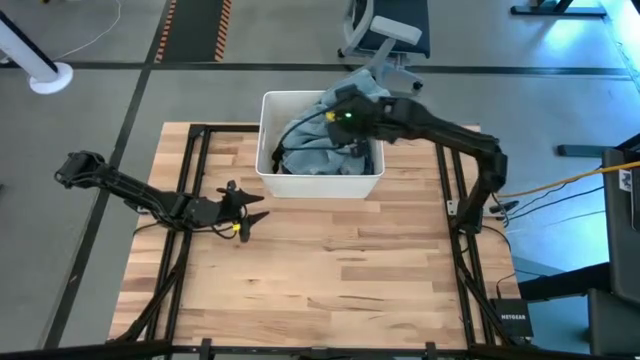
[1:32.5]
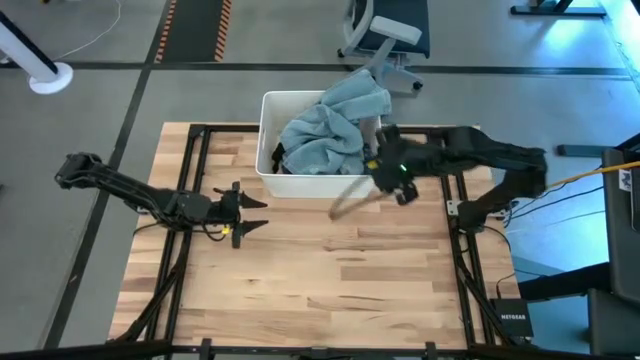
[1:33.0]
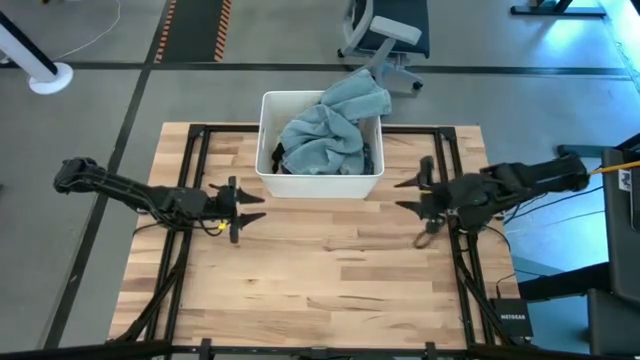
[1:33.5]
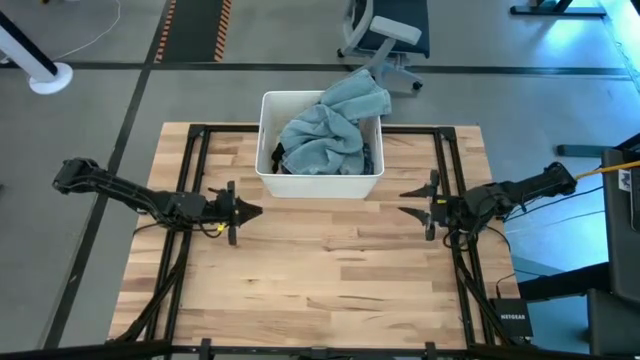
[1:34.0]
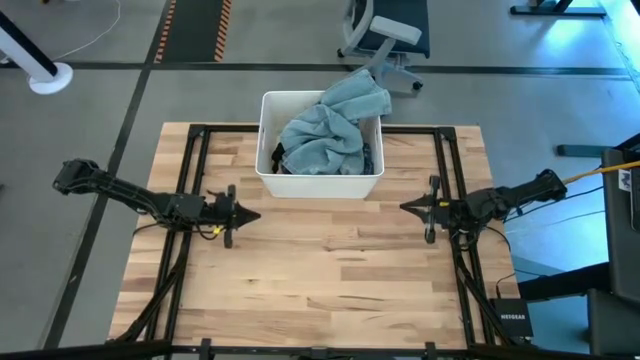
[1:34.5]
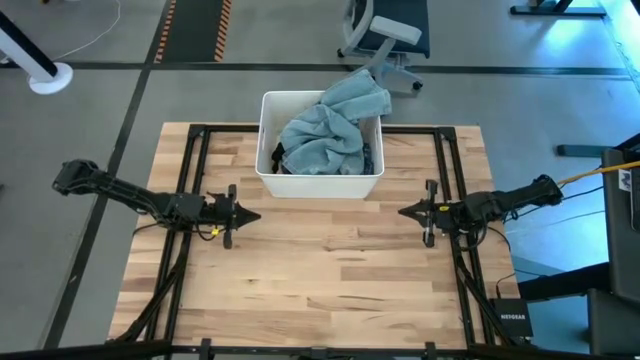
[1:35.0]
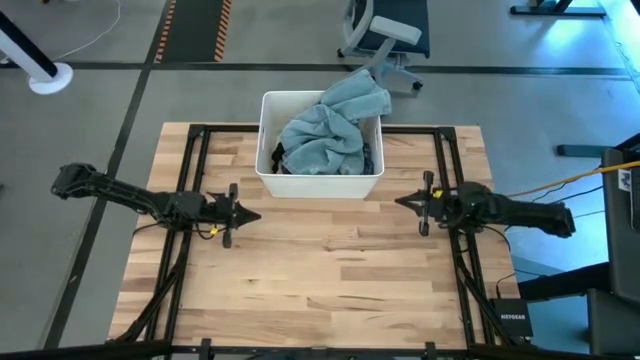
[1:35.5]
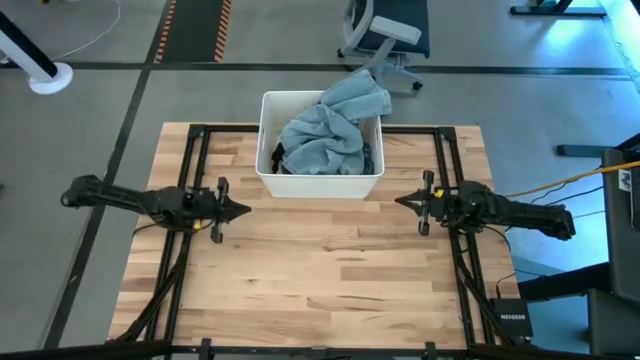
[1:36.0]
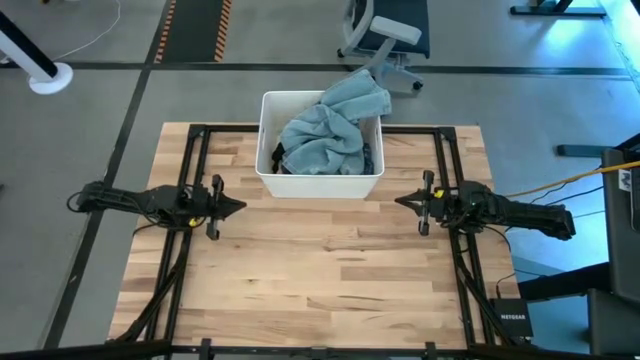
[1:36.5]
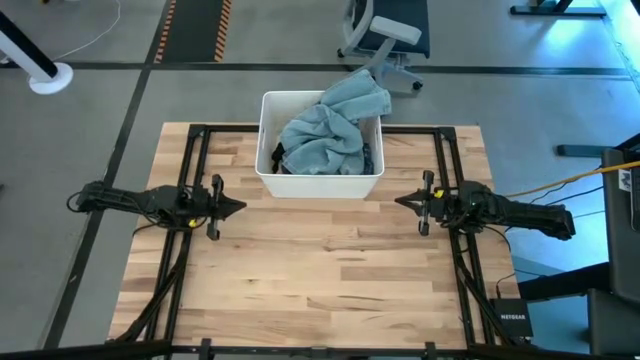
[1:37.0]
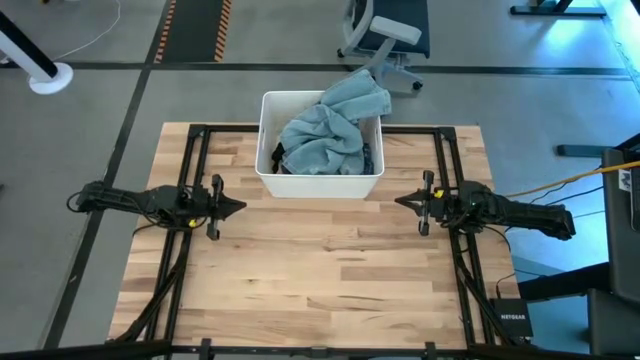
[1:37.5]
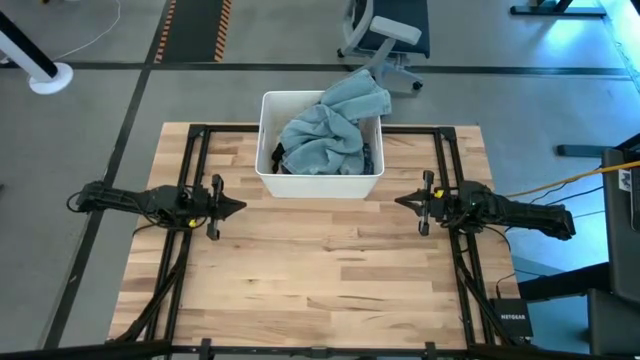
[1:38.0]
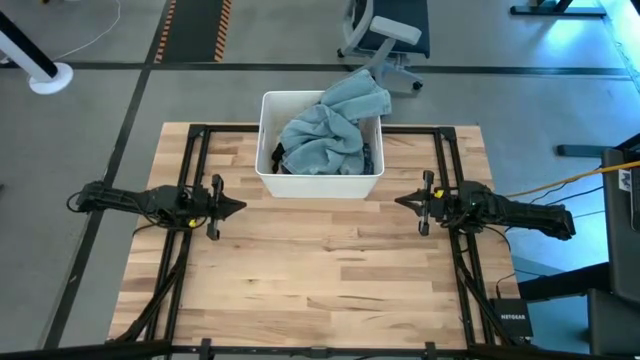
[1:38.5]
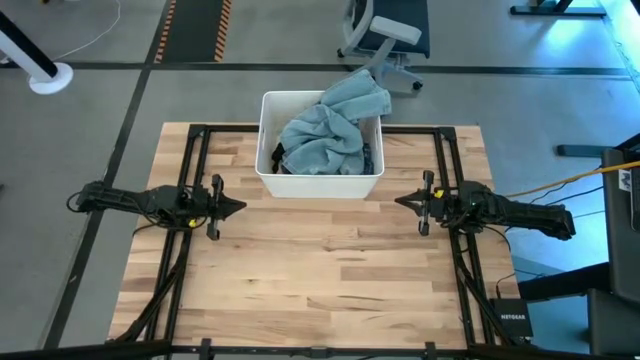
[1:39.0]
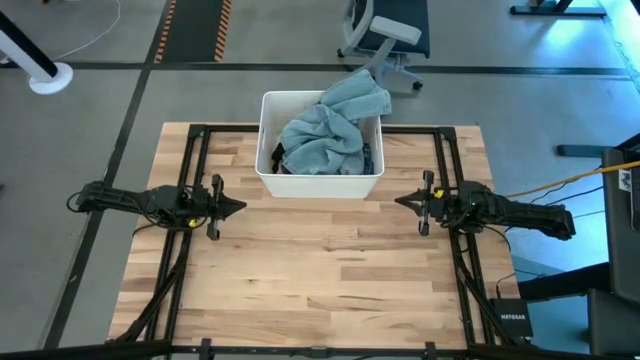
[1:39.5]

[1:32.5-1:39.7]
Task: Sort clothes
Return to Home Position

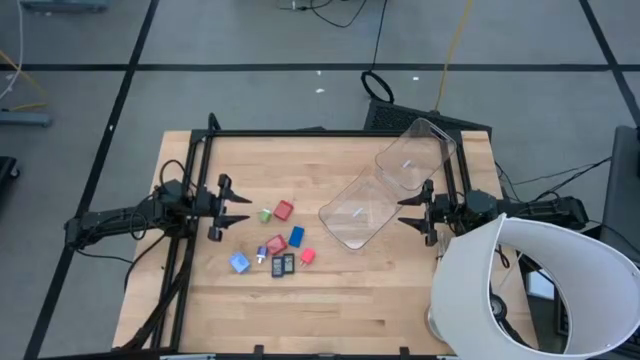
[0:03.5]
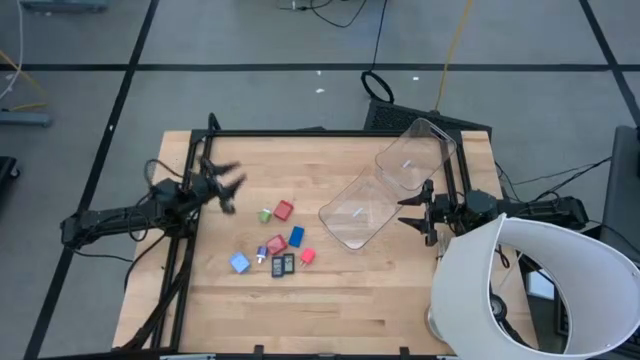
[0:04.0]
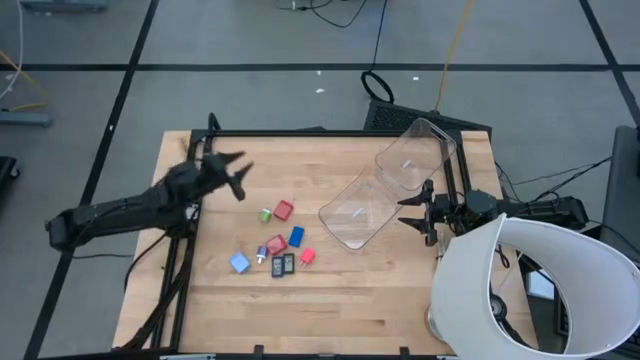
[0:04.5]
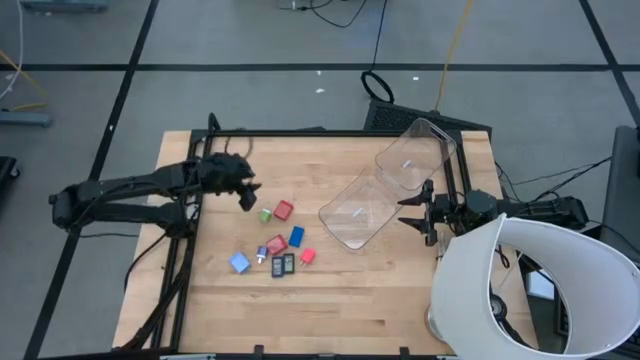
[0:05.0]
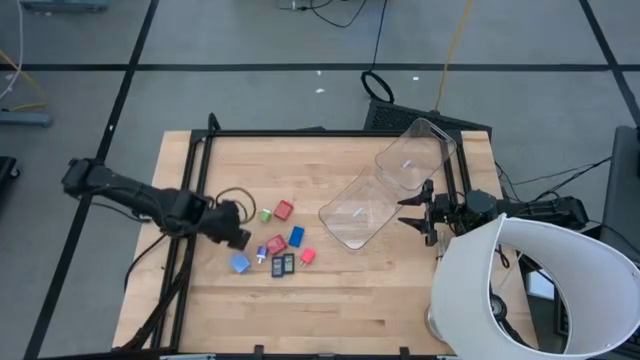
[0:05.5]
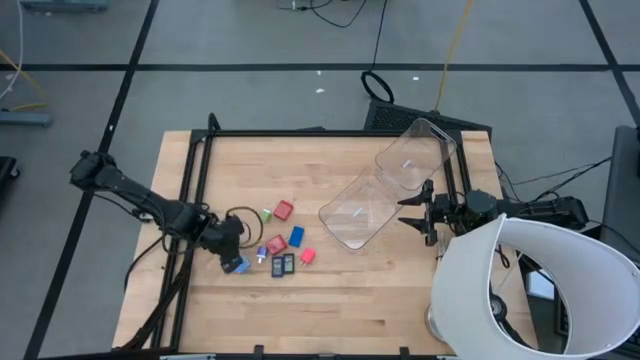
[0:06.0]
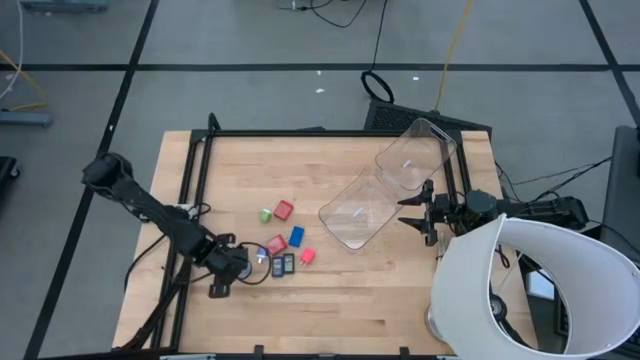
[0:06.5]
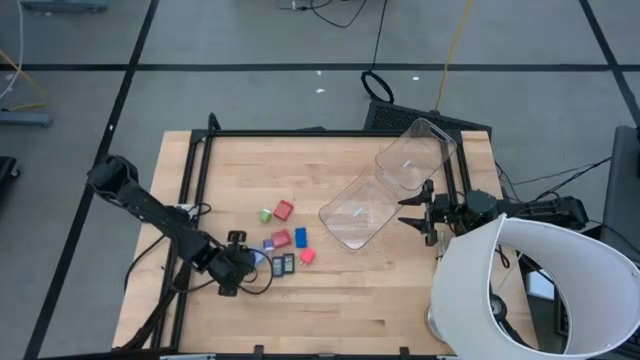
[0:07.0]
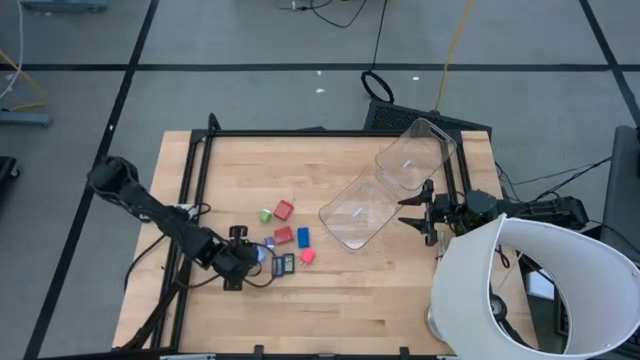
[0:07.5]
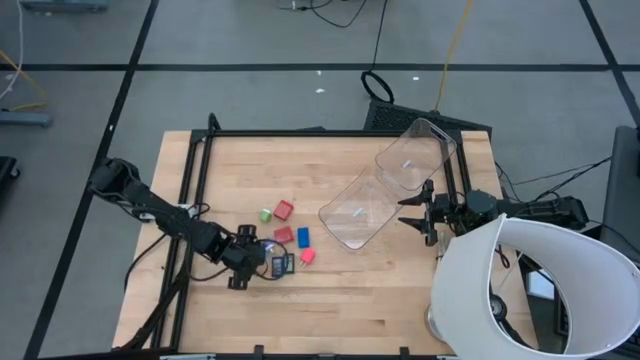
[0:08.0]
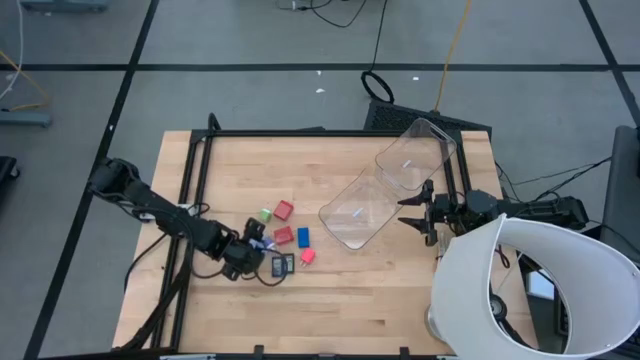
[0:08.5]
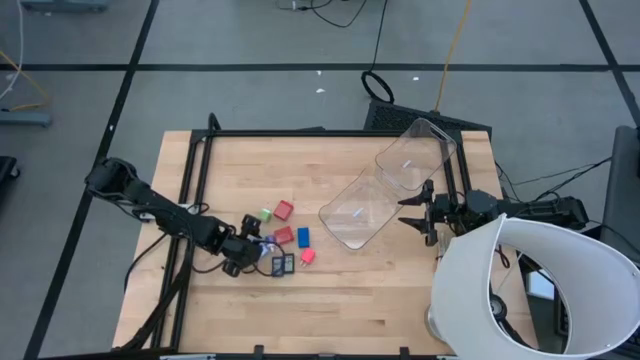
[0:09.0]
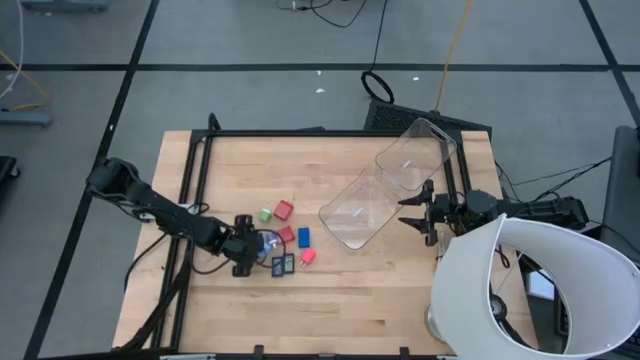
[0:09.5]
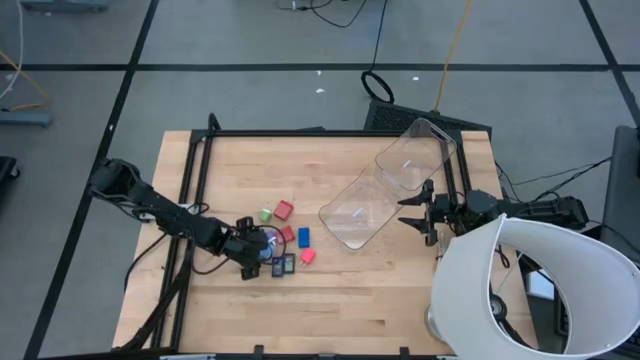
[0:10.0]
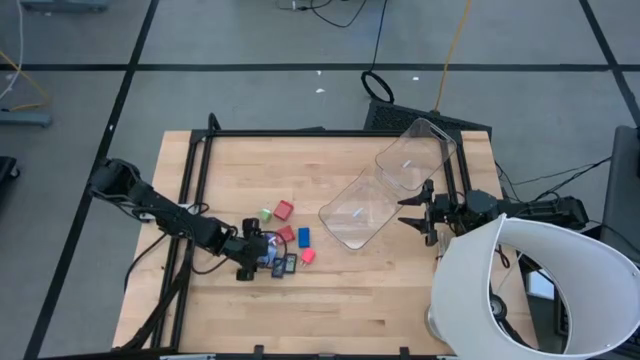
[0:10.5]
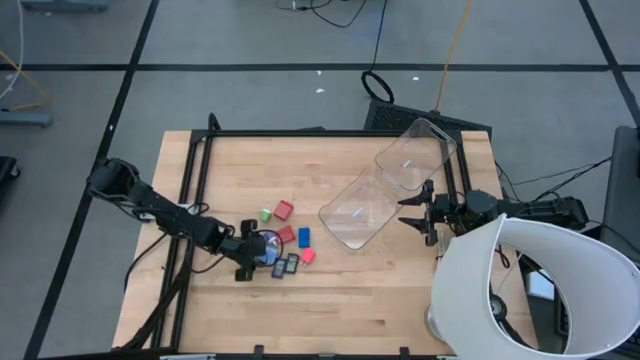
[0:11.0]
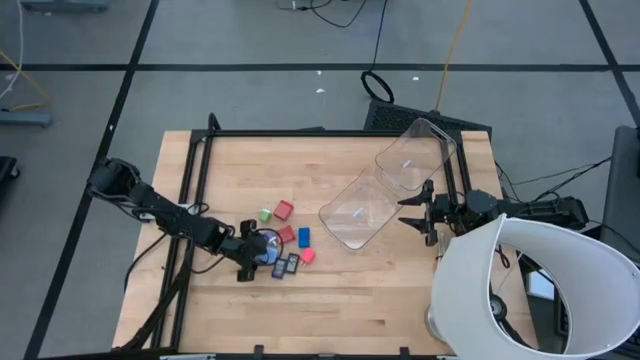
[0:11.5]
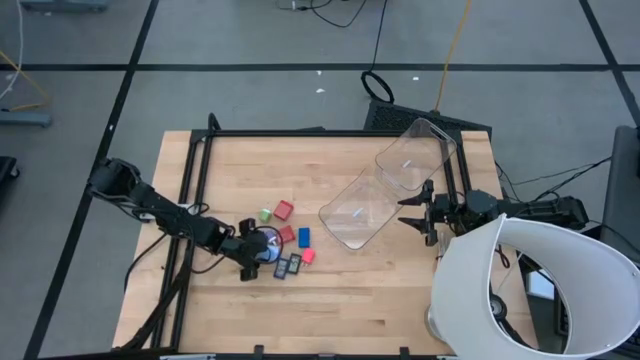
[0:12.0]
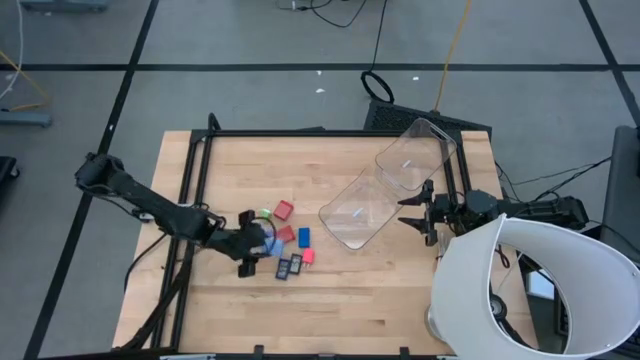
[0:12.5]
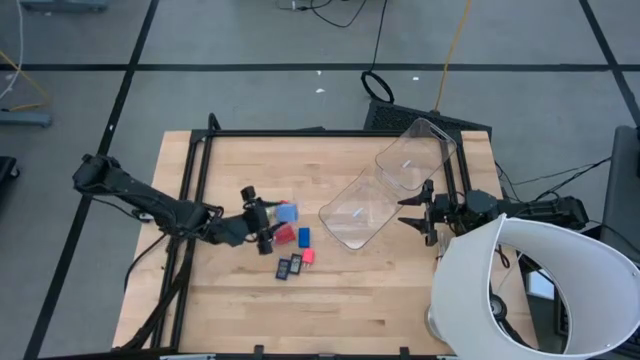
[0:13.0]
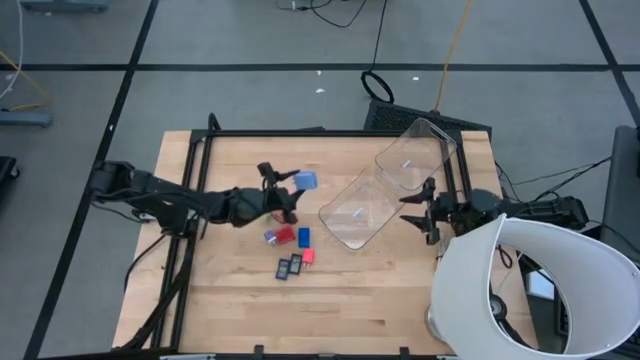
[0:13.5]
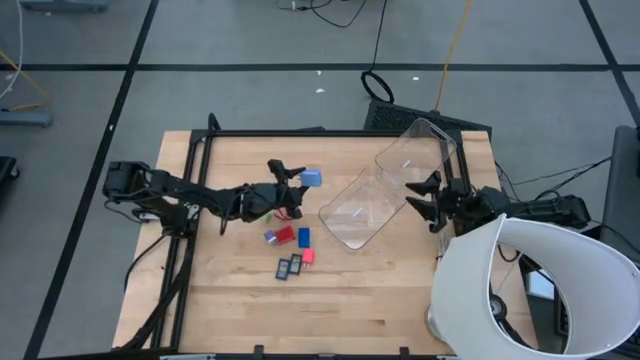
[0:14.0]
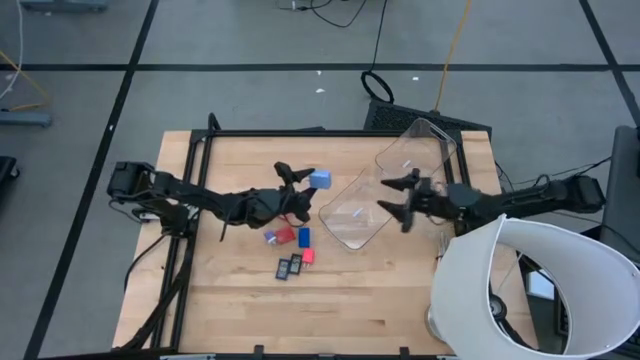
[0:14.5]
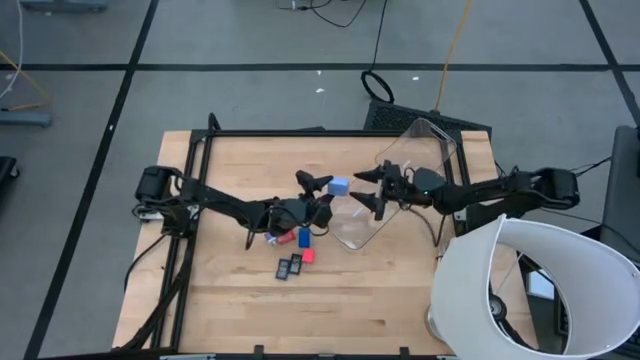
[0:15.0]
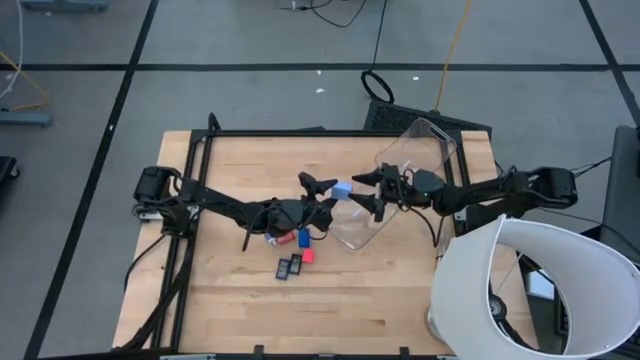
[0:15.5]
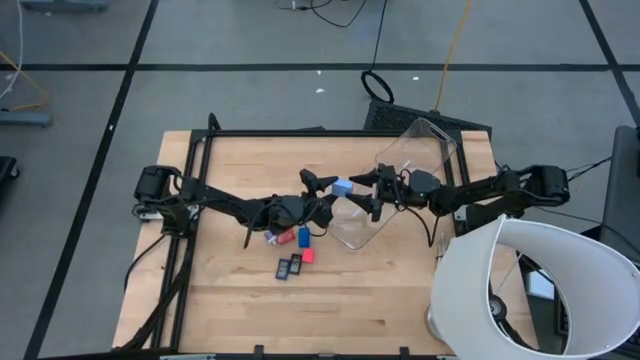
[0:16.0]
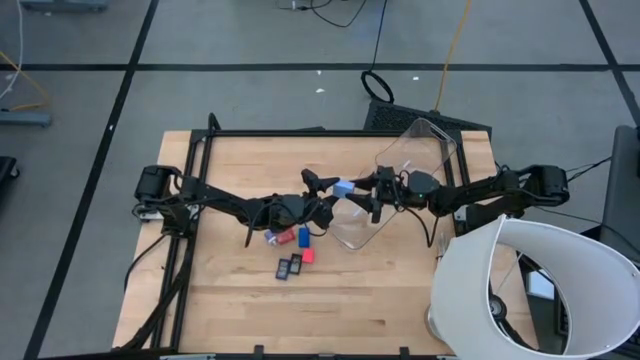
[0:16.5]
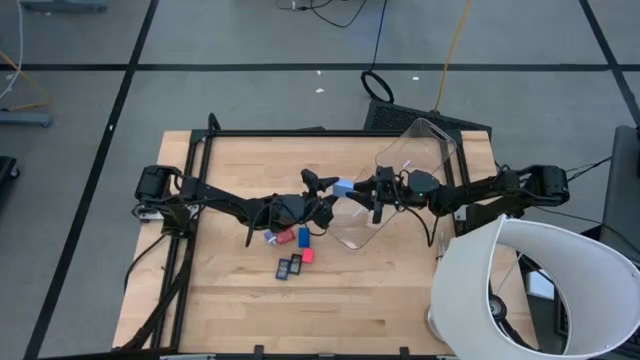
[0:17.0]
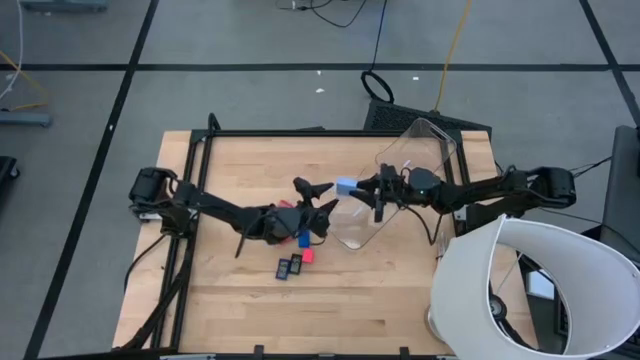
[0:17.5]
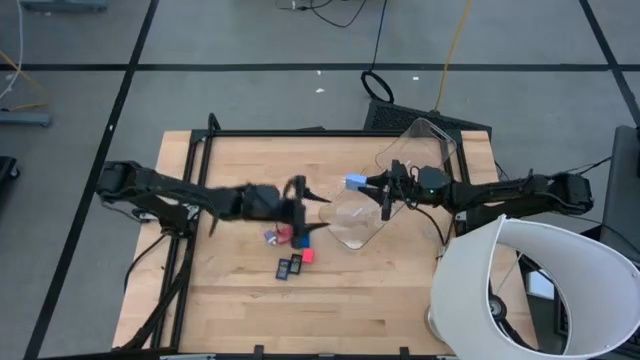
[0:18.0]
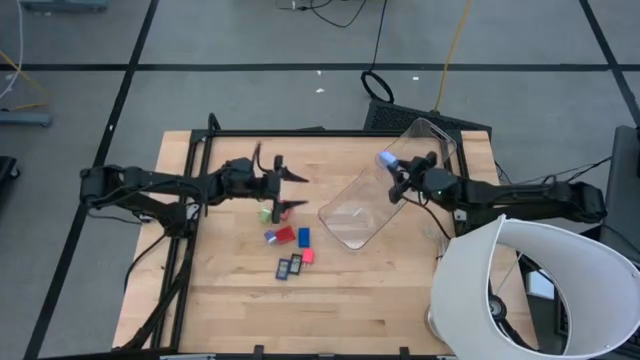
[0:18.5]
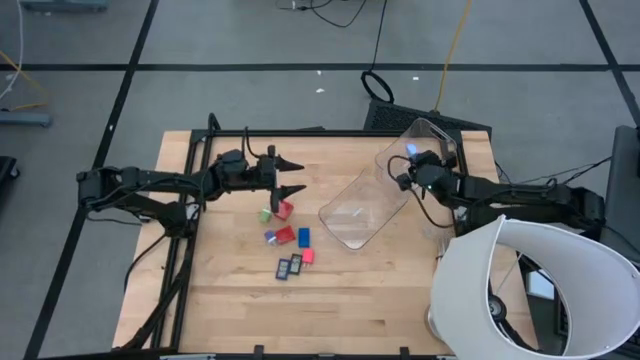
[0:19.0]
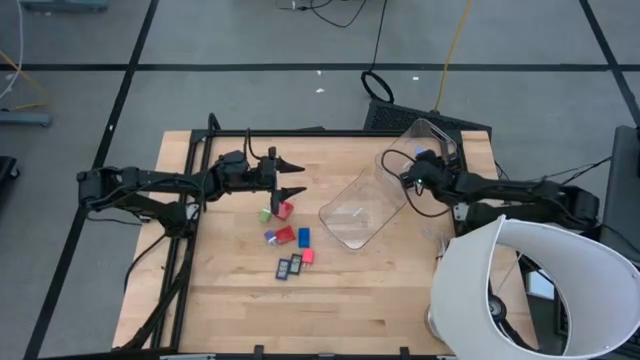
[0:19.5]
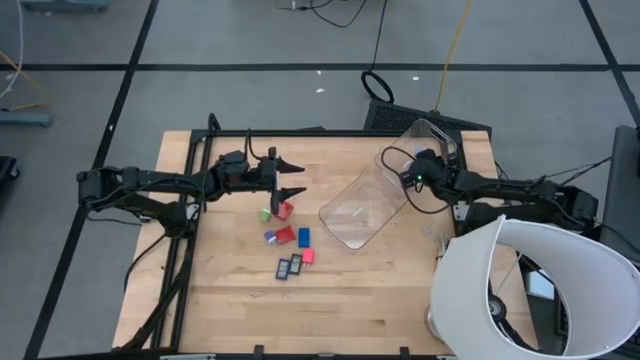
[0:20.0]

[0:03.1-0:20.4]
Task: Pick & Place Office items
Put the light blue charger adapter into the right transparent bin
